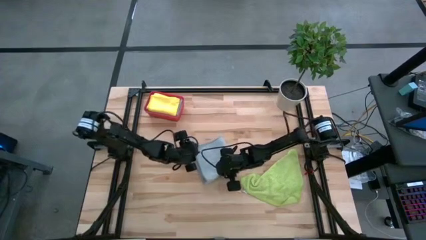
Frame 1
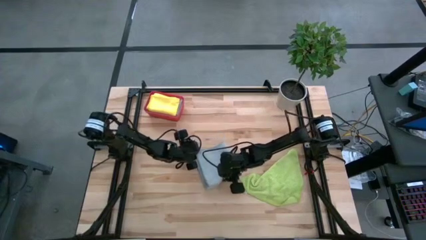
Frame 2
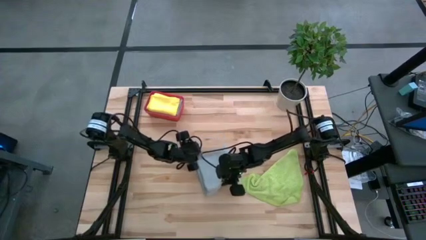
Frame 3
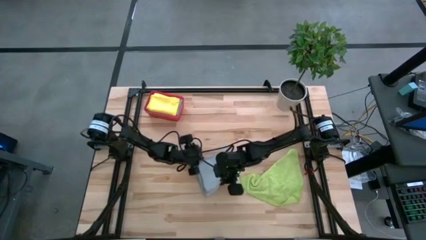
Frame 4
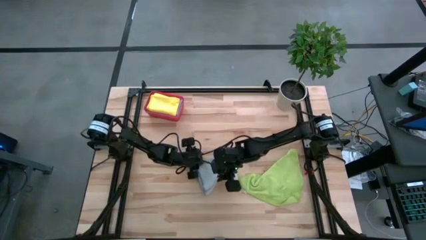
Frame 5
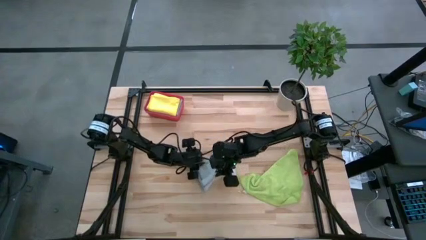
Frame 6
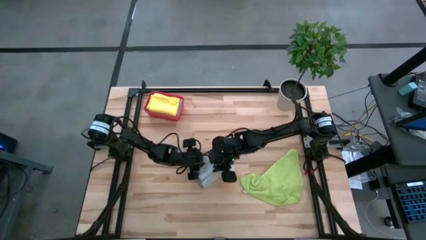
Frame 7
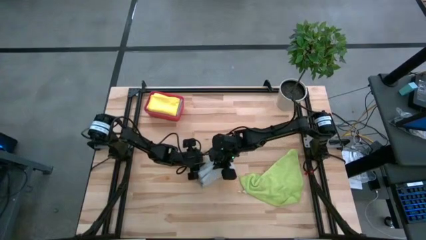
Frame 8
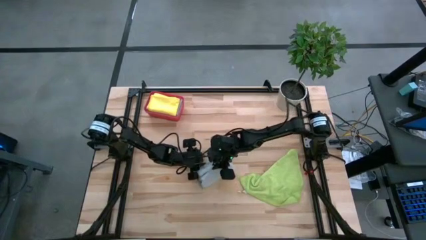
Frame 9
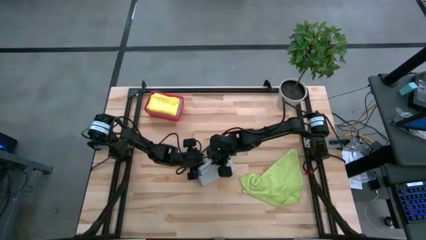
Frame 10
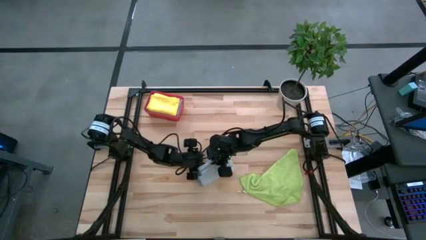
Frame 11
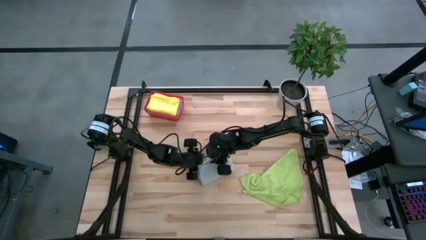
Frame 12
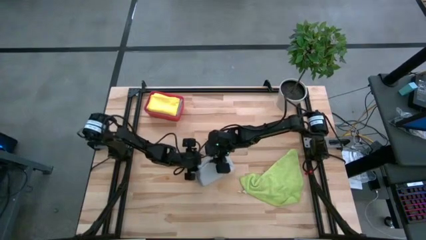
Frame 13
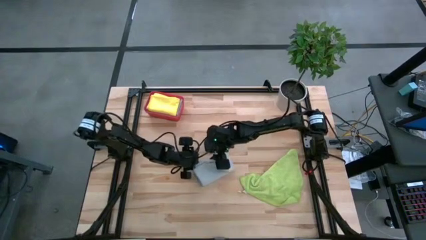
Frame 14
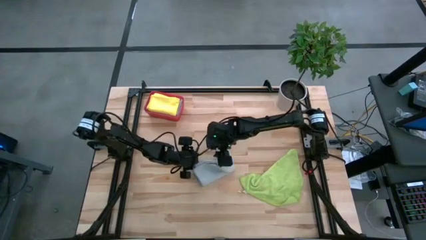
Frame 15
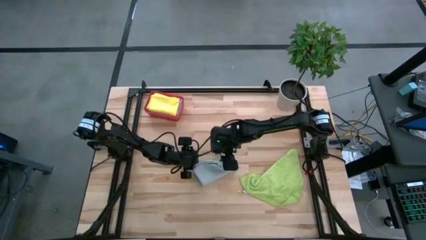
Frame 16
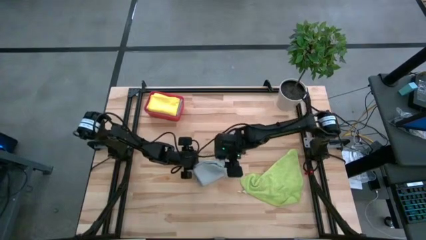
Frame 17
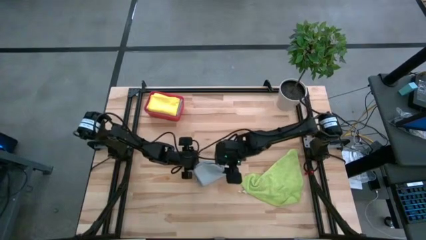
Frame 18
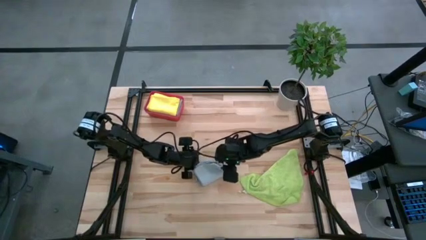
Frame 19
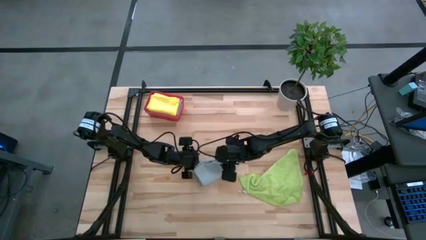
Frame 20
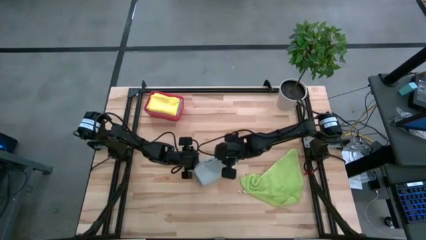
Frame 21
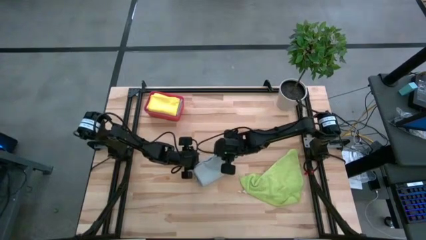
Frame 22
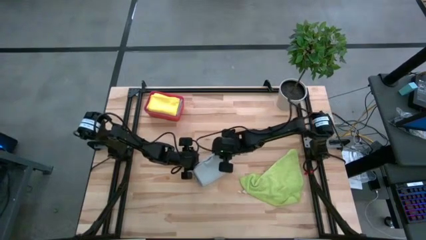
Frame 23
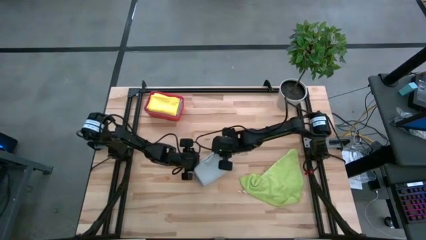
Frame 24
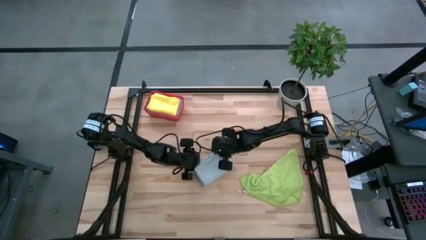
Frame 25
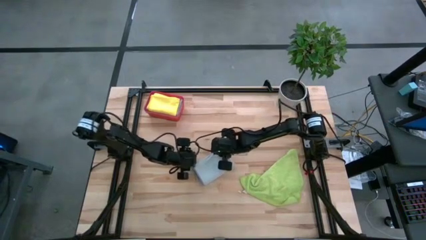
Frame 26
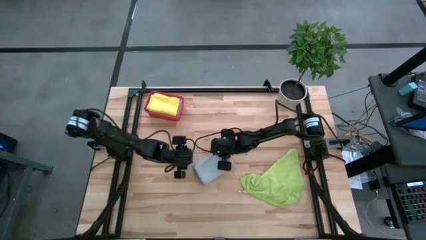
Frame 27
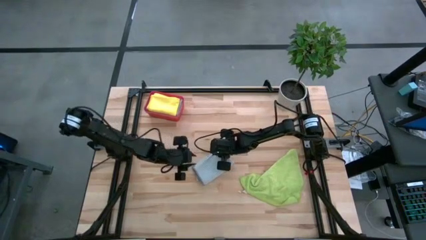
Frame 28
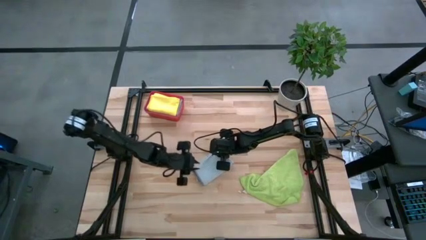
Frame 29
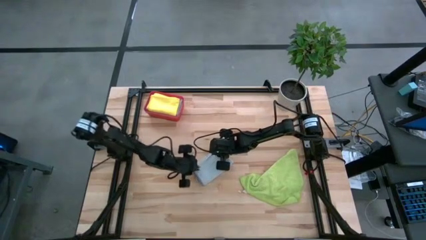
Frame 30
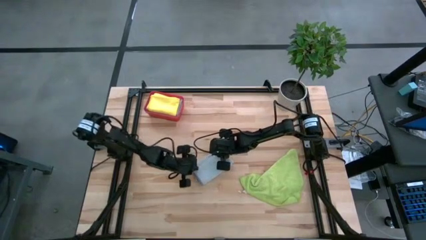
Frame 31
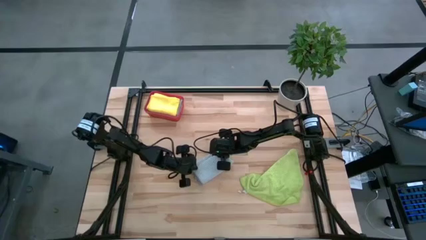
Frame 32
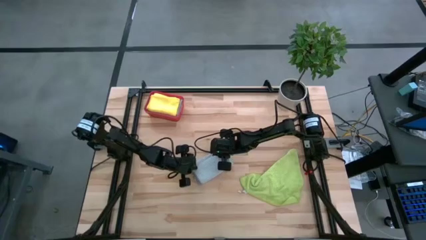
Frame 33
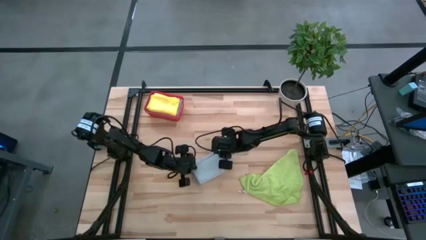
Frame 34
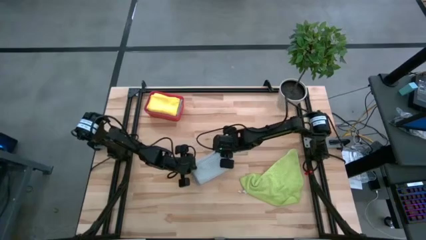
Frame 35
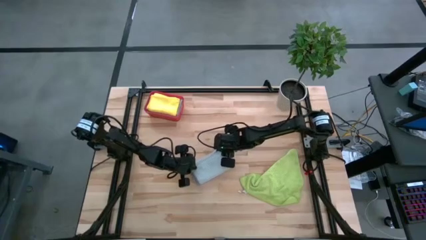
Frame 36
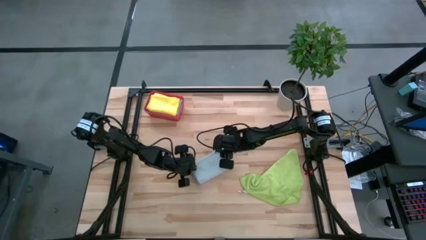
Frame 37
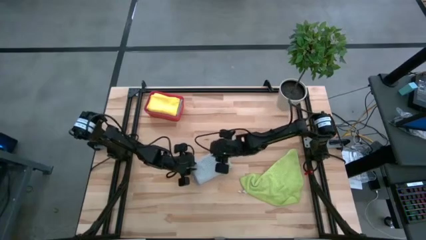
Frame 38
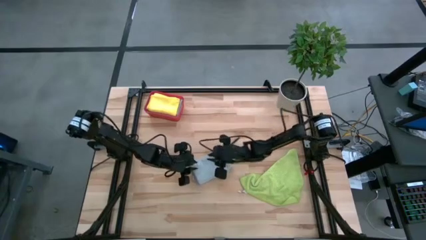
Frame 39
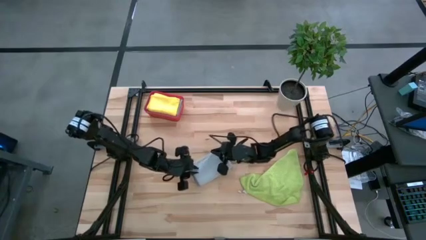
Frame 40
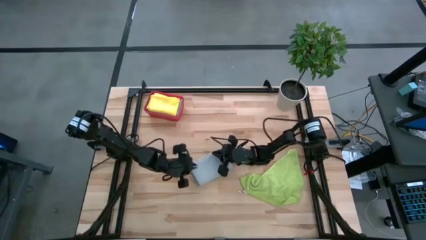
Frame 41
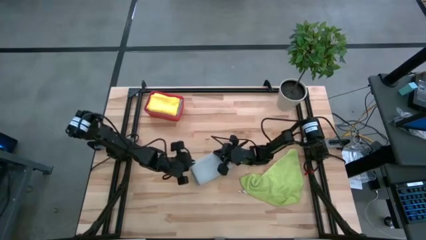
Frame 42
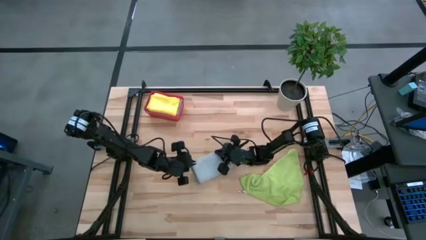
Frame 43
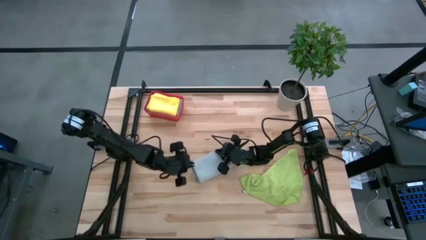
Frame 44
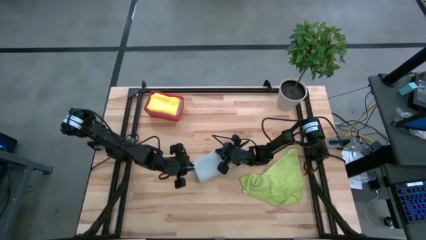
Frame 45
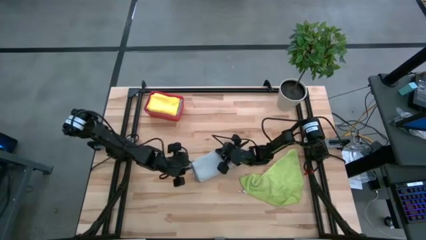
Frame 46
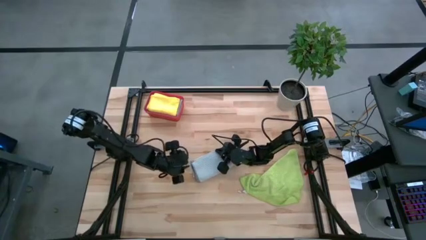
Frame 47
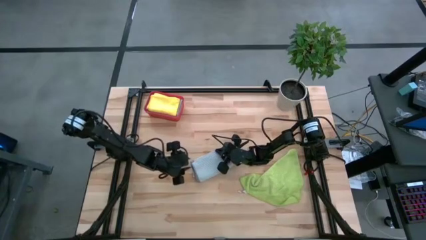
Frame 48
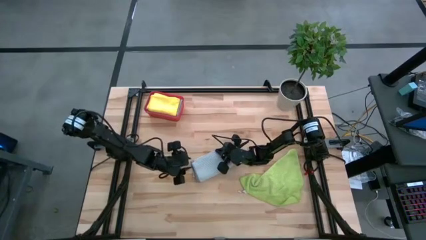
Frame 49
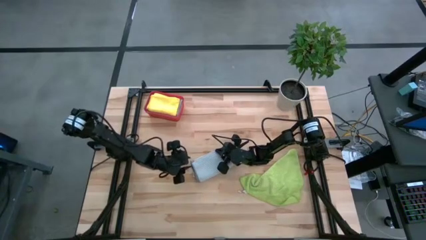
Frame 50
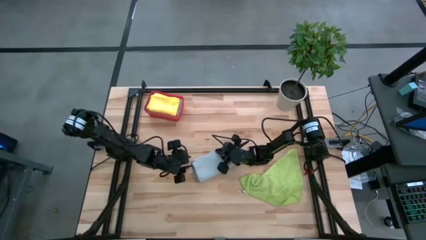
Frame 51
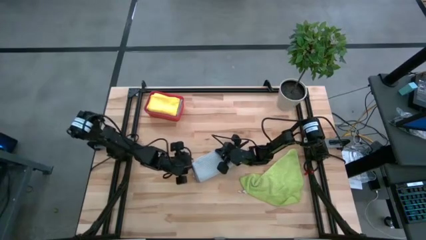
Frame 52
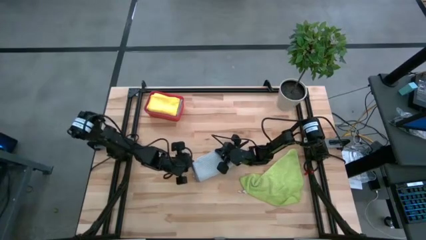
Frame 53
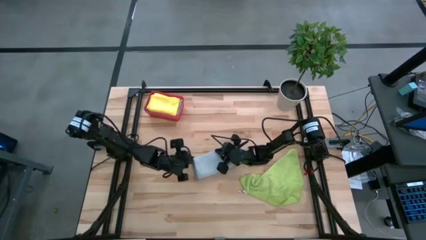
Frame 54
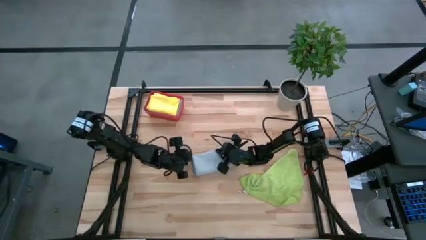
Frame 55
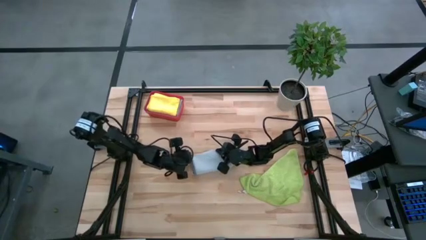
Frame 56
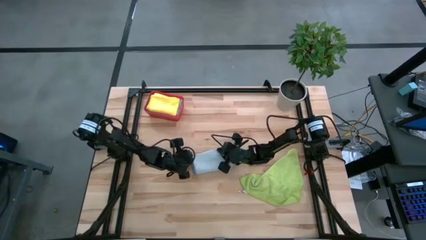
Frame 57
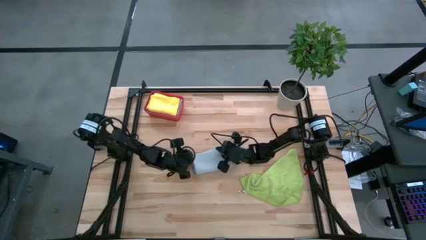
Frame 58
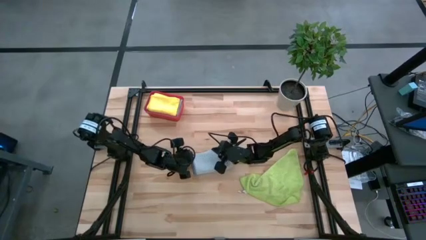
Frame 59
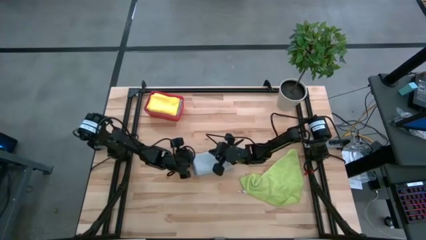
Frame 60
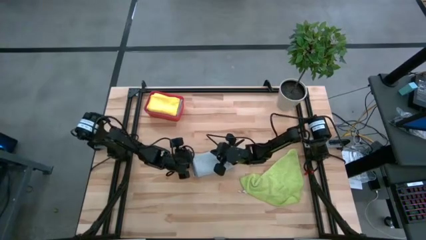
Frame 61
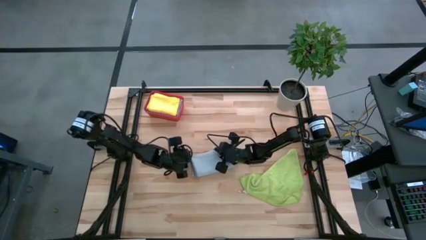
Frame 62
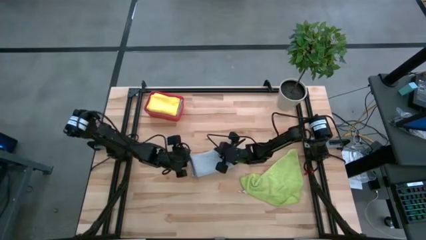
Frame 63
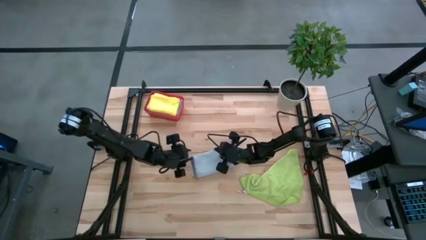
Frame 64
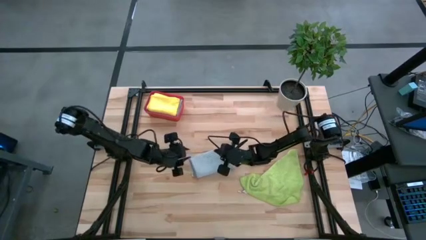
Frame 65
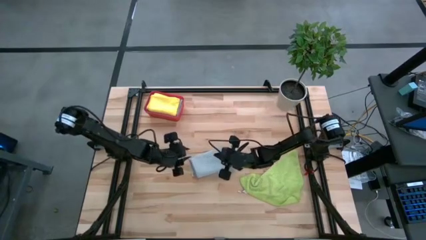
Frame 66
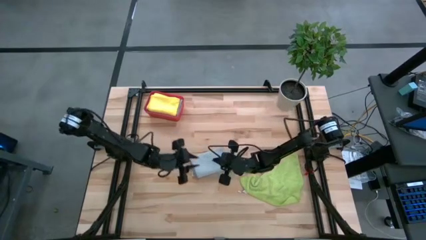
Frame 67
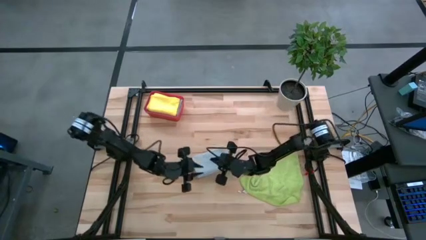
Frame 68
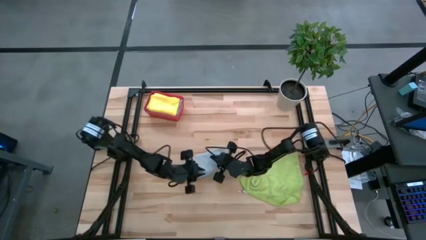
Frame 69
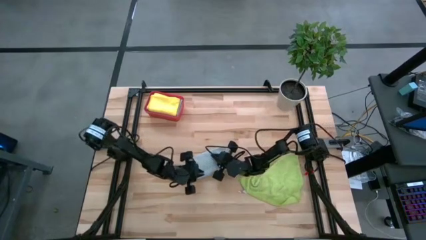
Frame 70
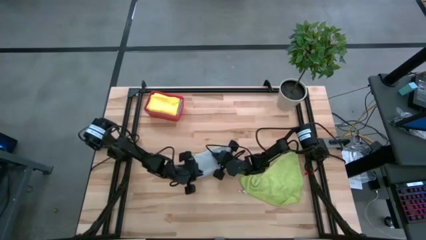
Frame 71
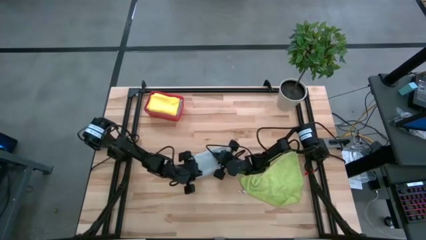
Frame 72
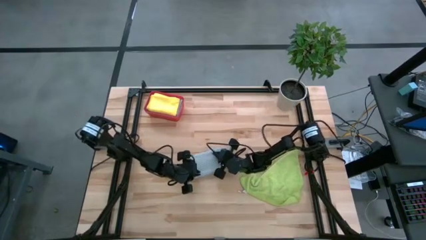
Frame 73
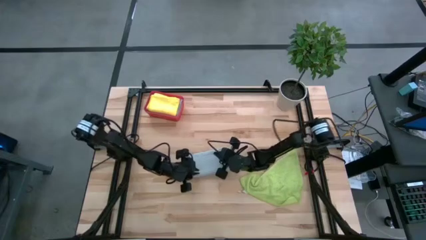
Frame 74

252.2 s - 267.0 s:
Task: Fold microfiber towels
Fold the gray microfiber cloth
